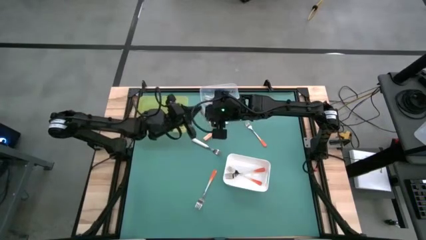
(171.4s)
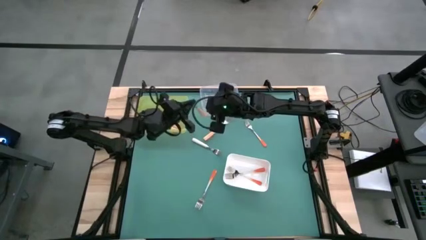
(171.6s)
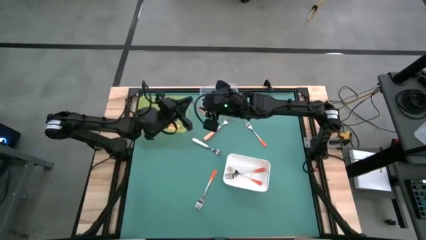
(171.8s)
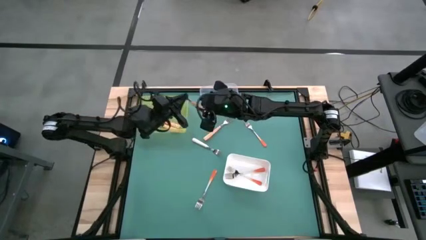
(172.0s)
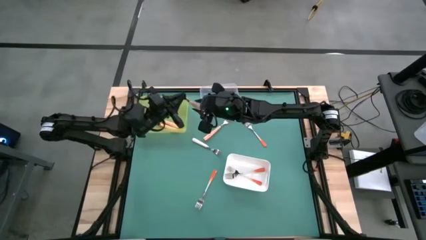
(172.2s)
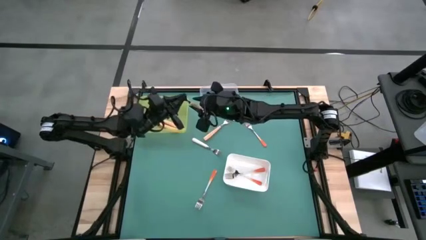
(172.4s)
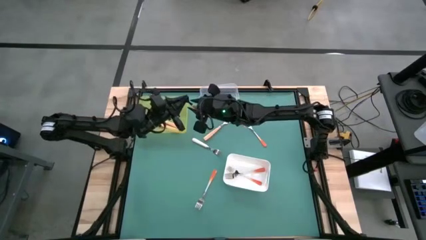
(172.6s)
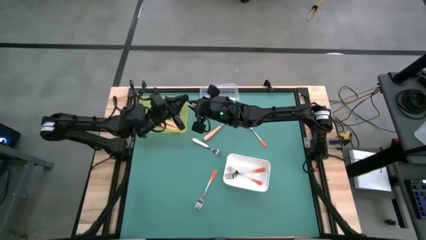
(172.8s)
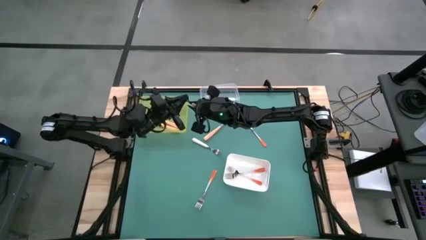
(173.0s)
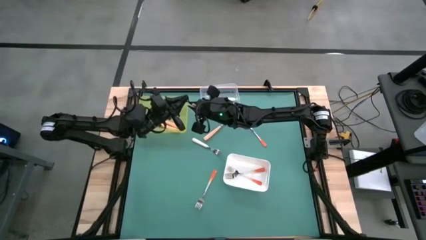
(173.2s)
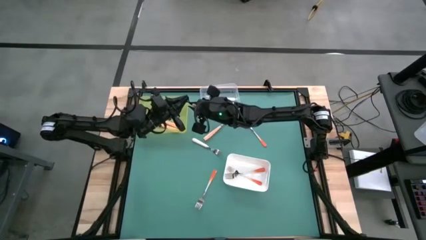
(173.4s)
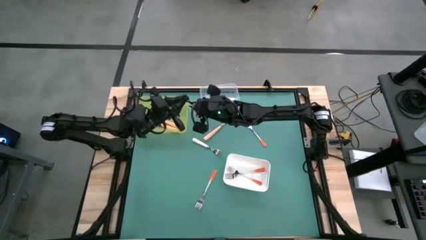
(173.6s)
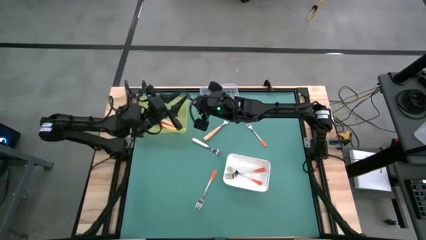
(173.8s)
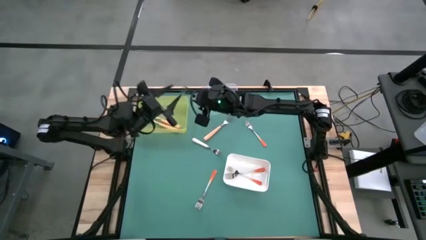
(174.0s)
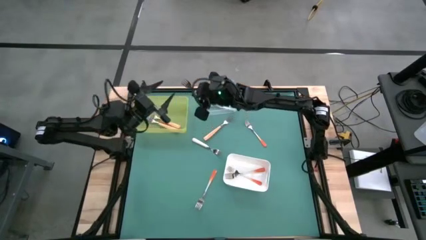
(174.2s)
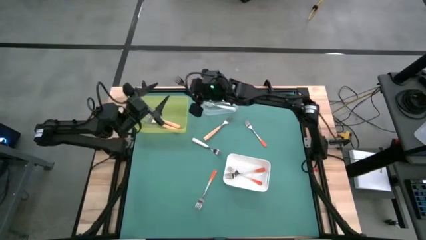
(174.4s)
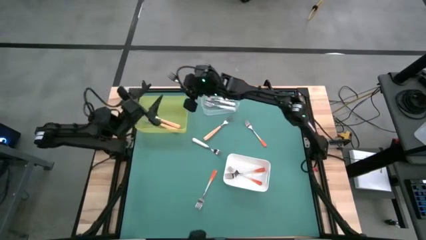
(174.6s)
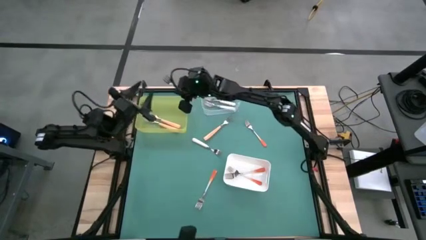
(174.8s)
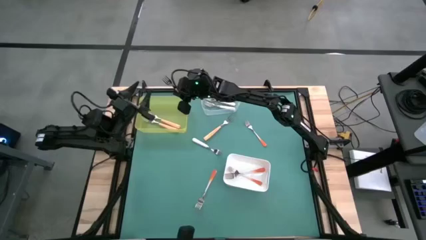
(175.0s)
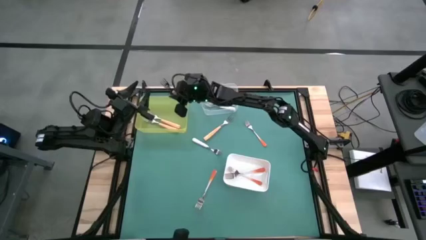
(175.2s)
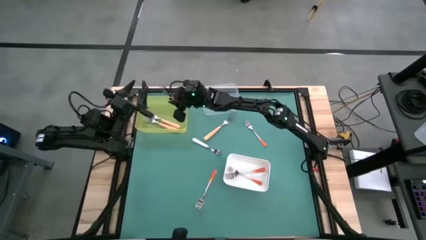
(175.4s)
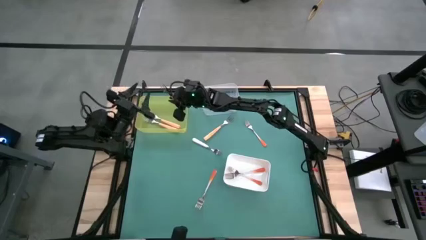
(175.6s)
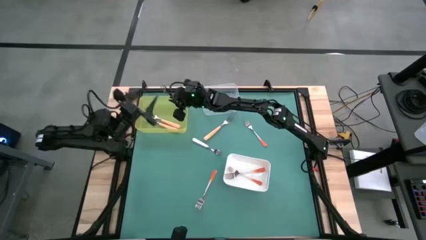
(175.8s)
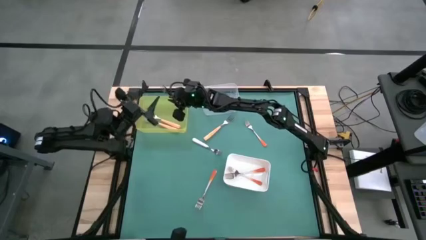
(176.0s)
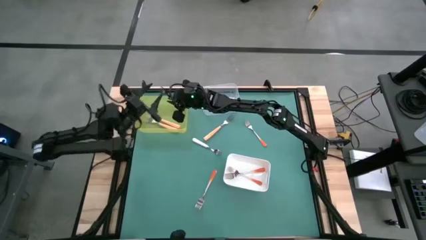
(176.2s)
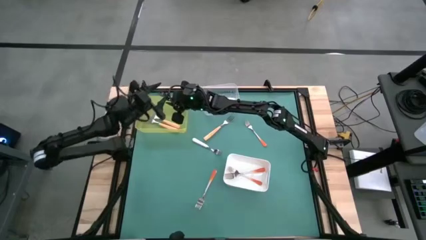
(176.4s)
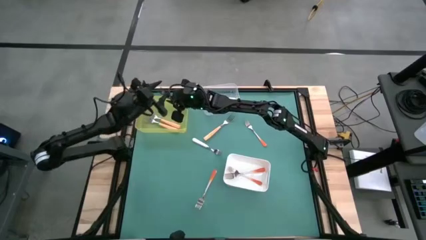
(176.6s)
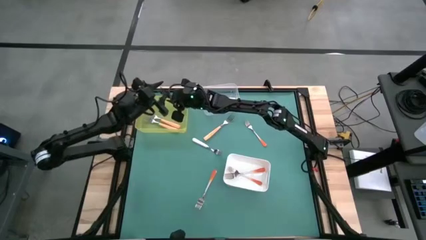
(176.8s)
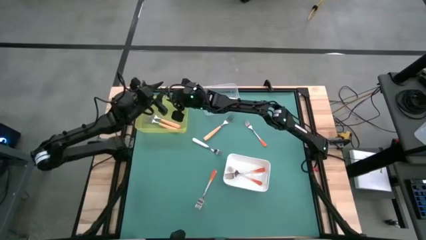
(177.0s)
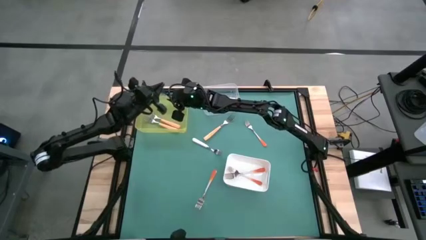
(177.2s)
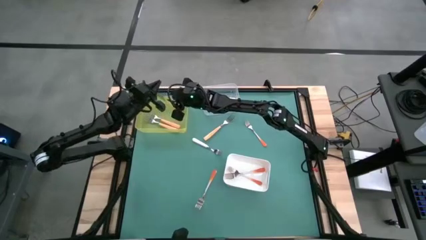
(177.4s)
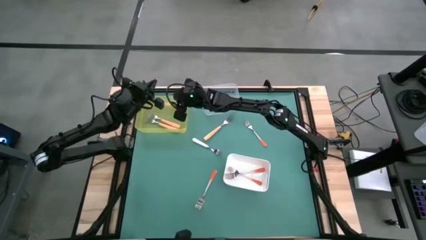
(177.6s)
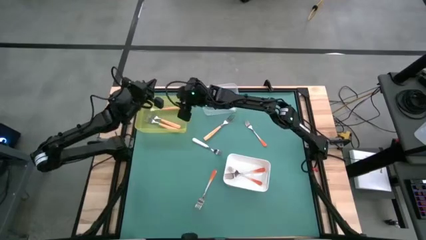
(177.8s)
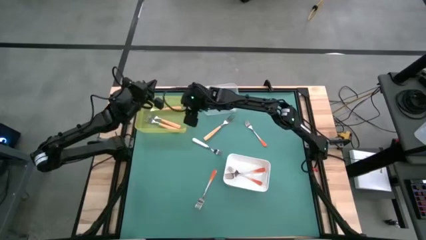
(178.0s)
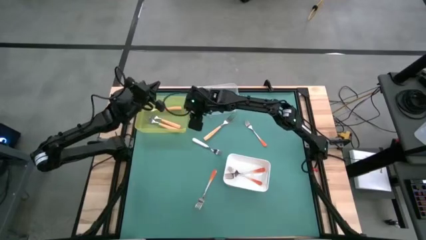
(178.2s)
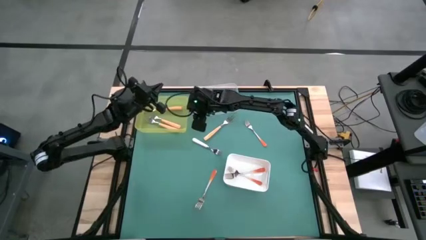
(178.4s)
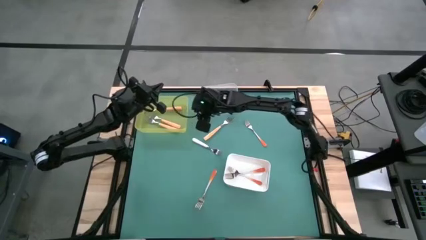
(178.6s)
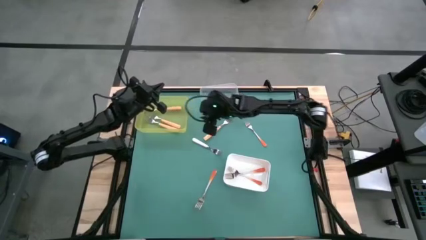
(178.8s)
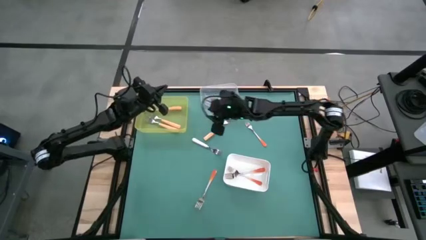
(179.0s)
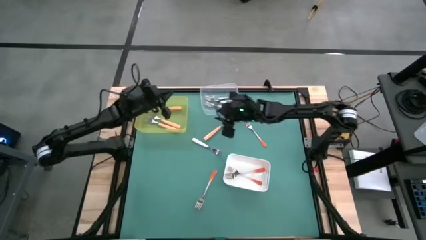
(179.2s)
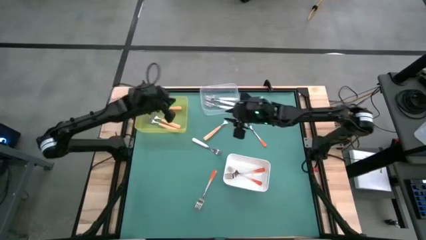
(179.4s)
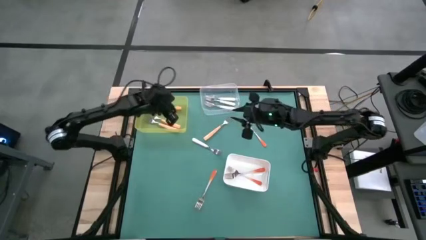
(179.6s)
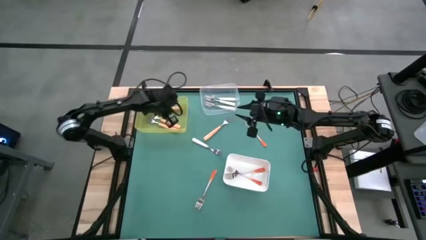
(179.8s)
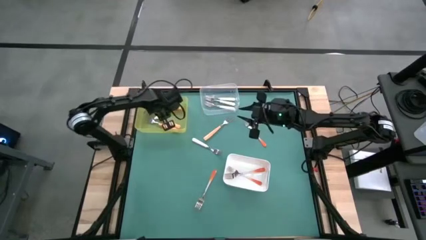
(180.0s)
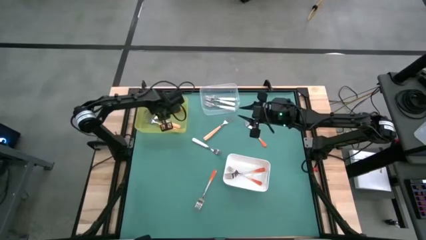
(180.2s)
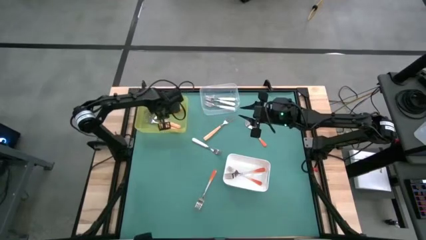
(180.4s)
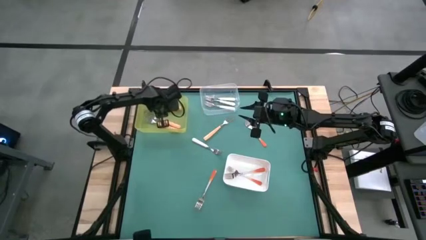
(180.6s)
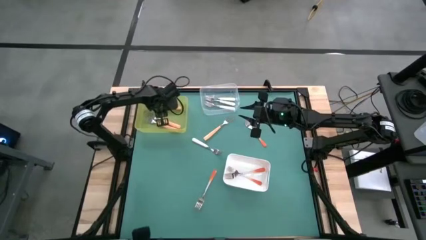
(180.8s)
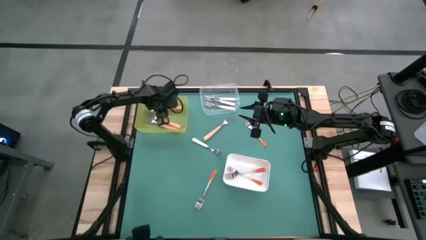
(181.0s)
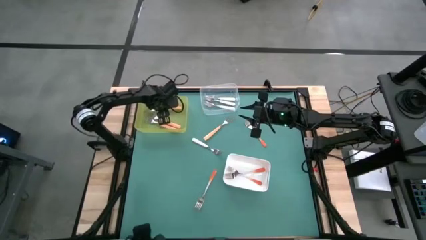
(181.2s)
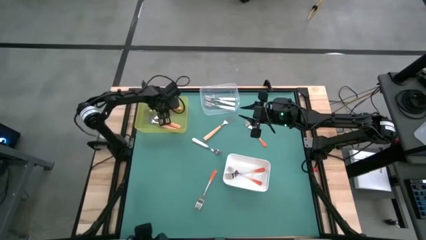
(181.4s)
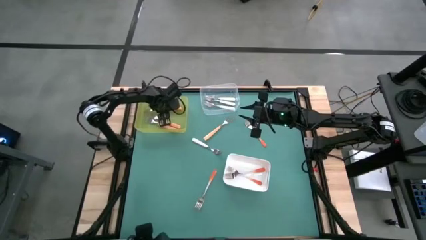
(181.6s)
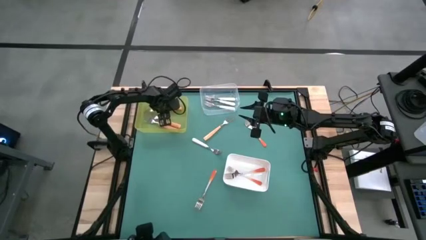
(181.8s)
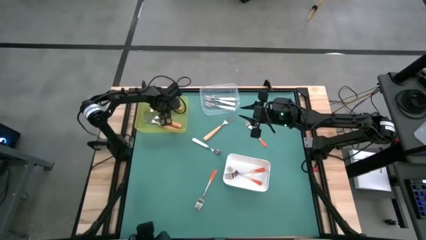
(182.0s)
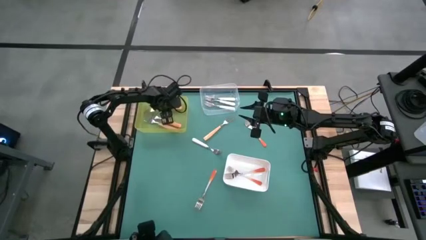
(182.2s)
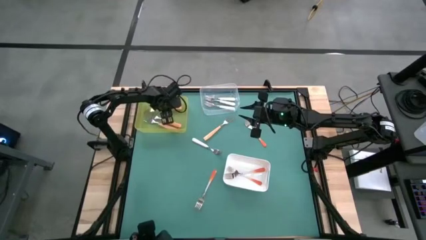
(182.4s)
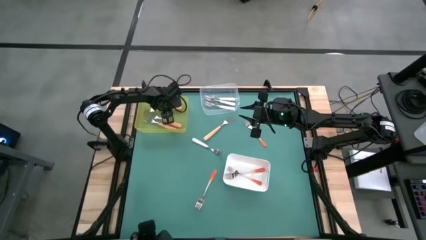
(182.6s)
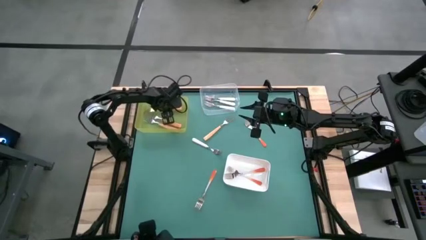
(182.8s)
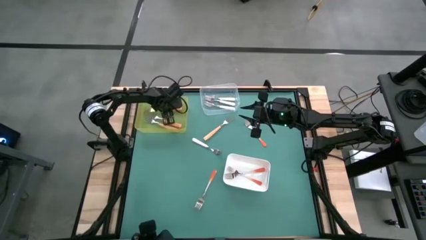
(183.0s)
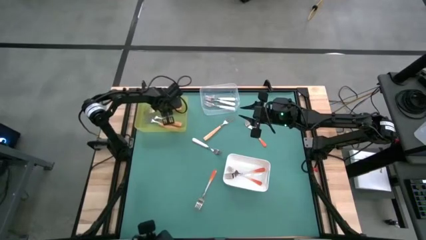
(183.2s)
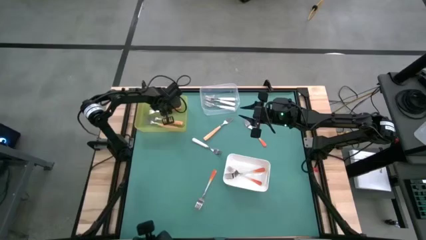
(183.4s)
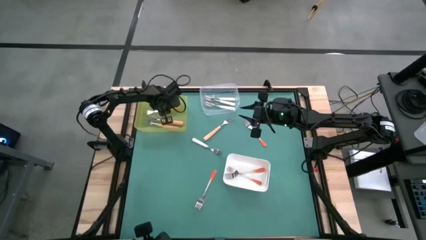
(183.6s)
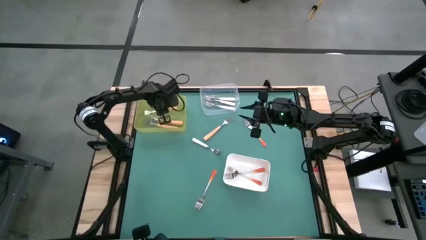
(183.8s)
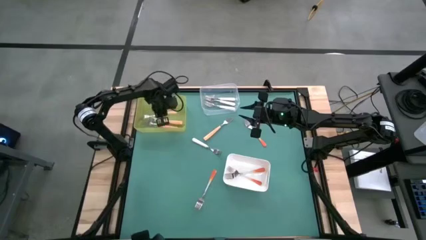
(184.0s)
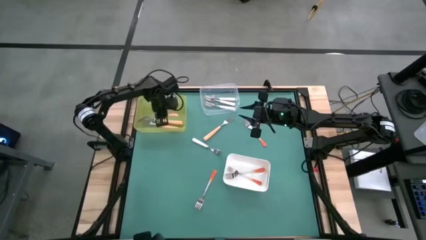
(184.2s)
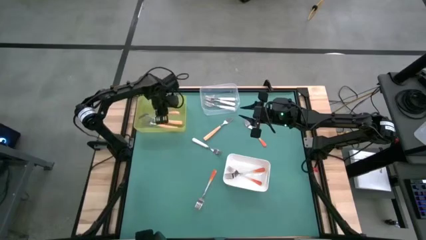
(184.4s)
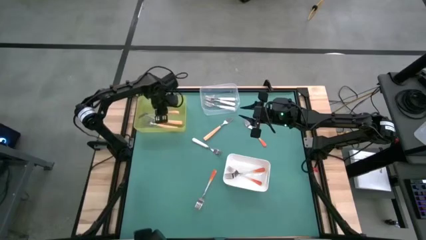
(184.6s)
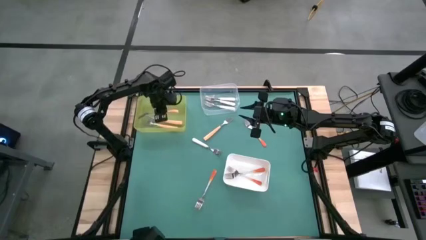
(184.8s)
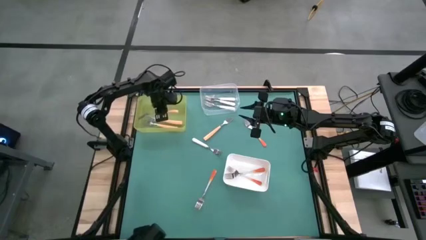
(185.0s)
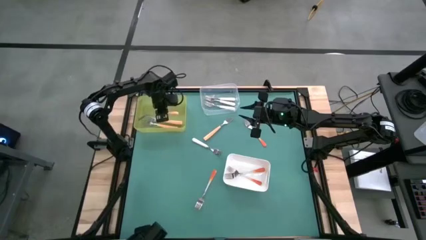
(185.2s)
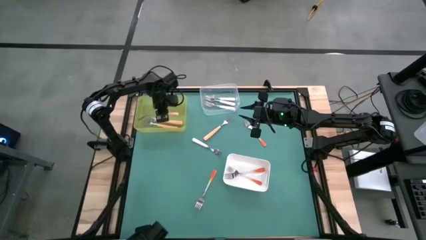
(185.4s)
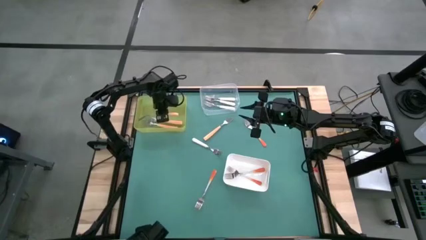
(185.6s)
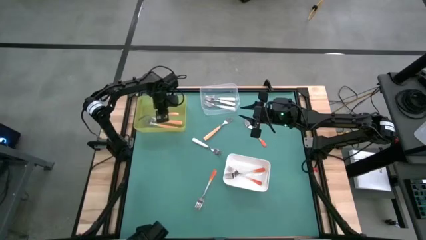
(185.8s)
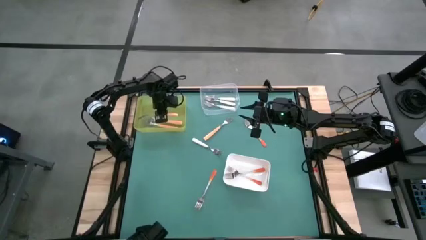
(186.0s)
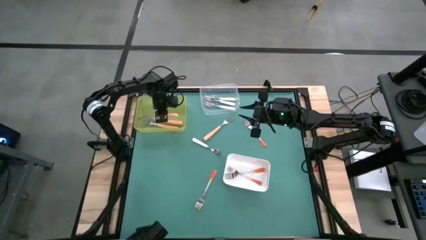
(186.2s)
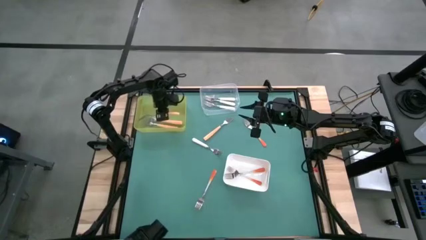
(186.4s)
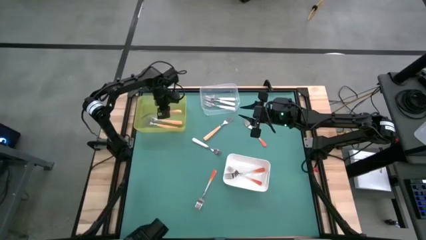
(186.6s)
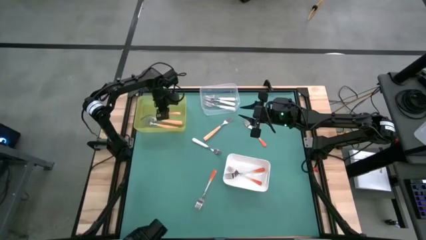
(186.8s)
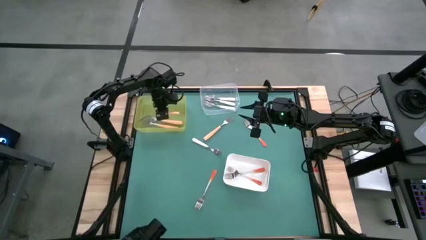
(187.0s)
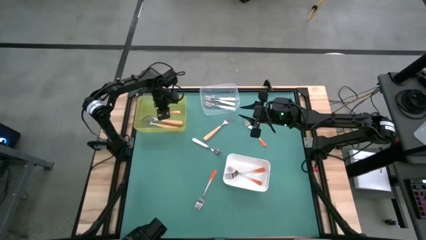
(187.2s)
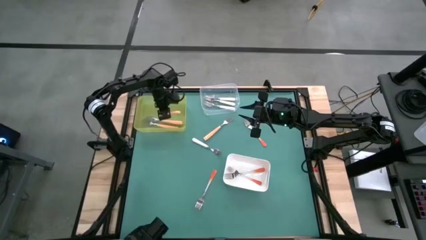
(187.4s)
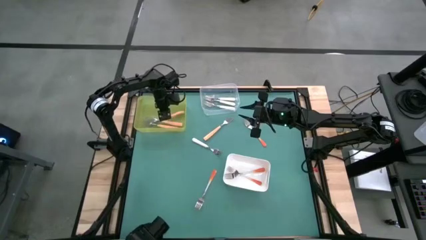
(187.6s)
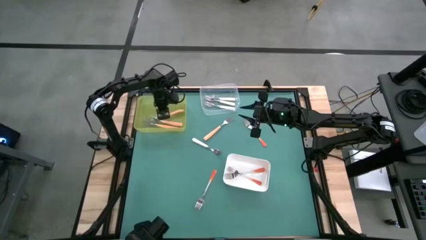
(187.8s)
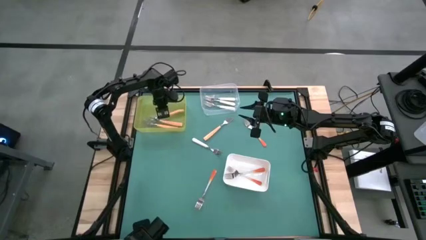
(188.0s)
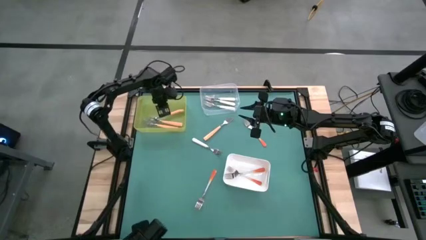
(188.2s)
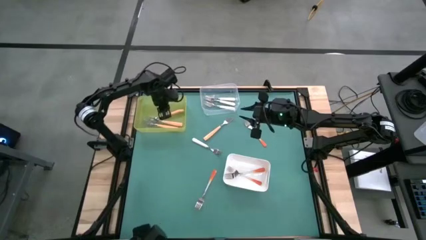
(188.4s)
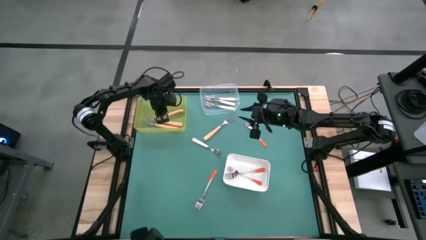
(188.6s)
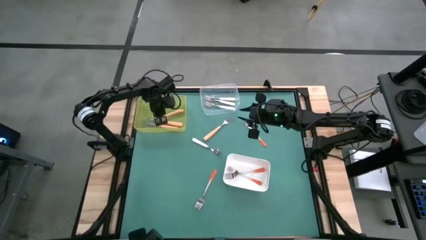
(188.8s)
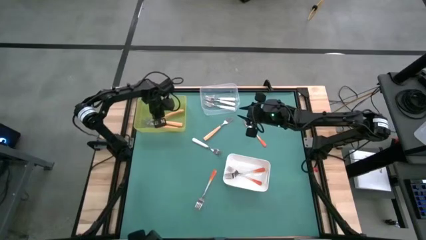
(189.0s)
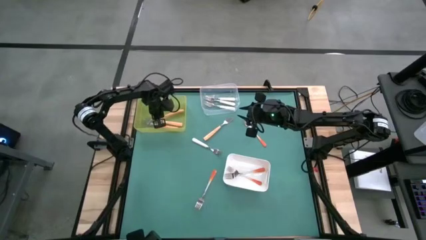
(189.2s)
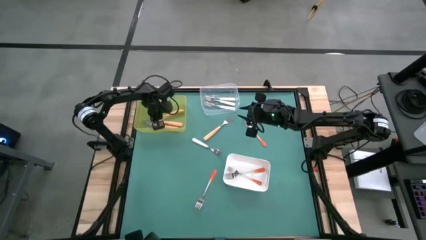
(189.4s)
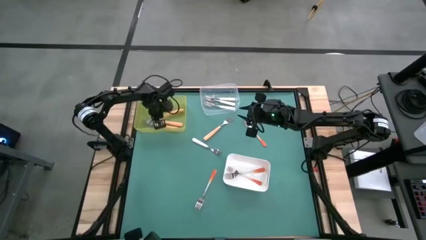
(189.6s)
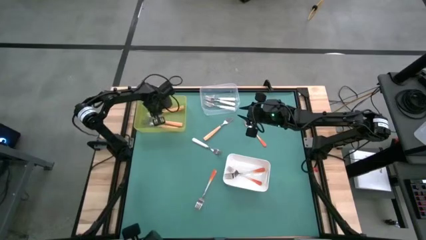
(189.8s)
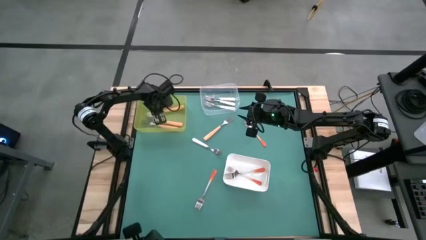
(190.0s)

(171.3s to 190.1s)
Task: Sort silverware by color (type)
Put the light orange into the yellow bin
